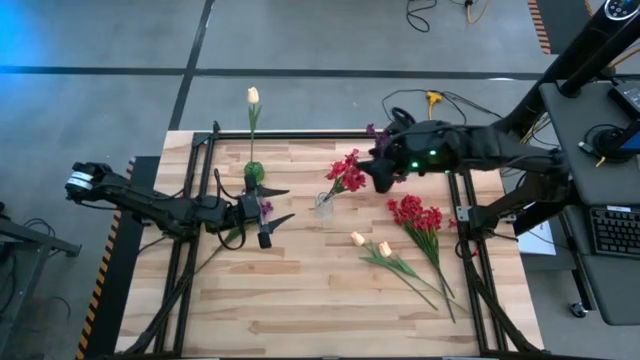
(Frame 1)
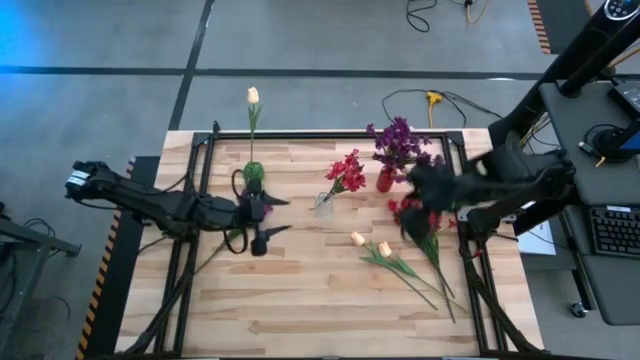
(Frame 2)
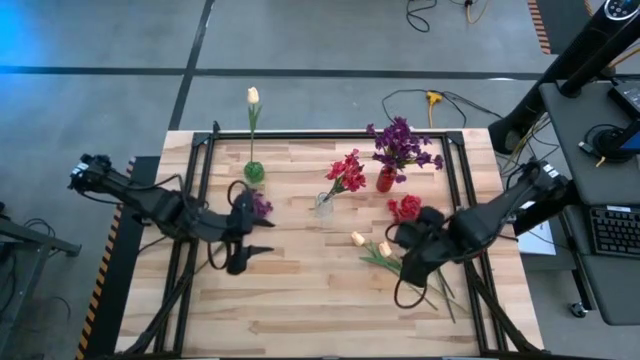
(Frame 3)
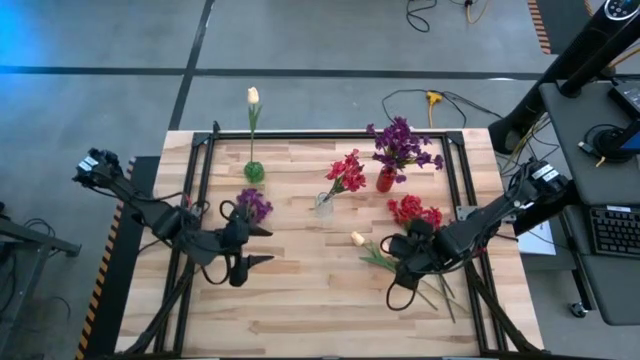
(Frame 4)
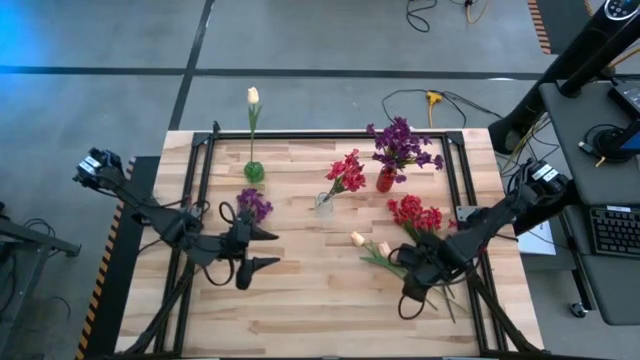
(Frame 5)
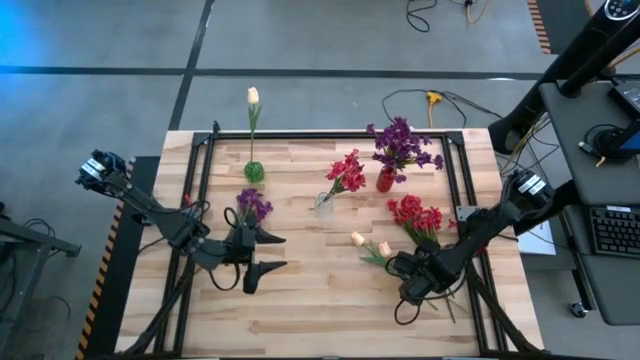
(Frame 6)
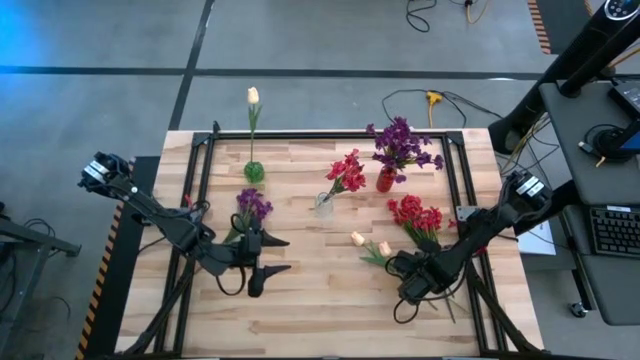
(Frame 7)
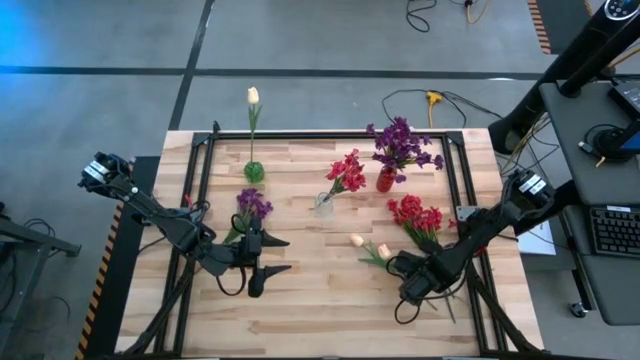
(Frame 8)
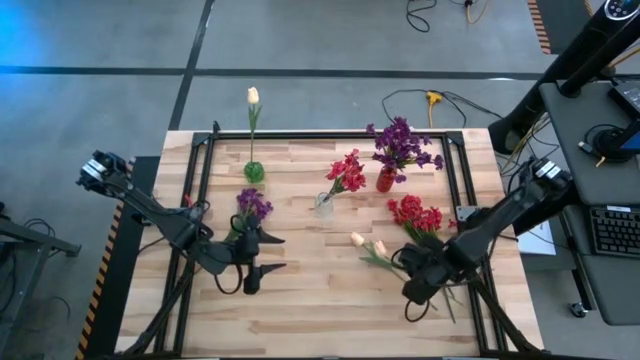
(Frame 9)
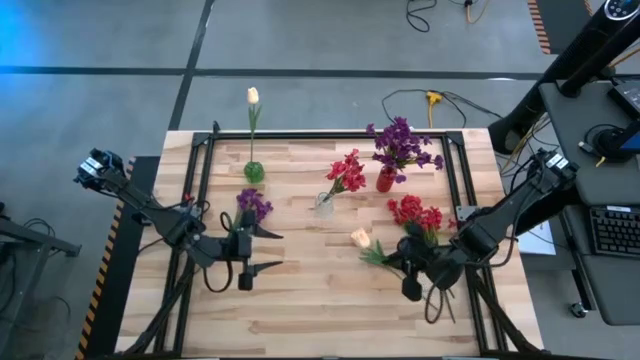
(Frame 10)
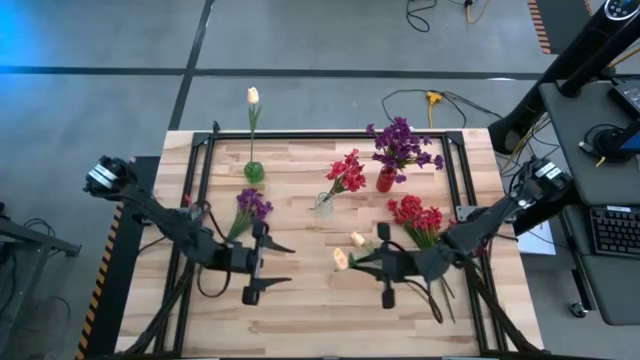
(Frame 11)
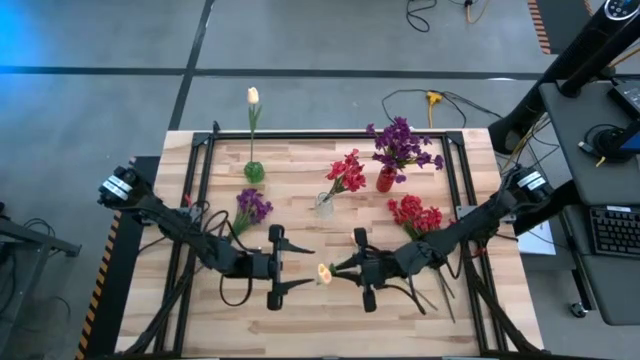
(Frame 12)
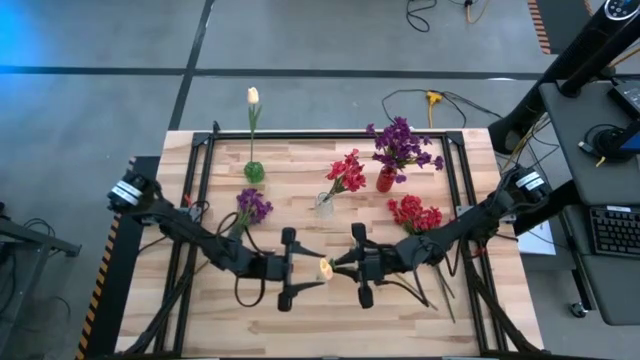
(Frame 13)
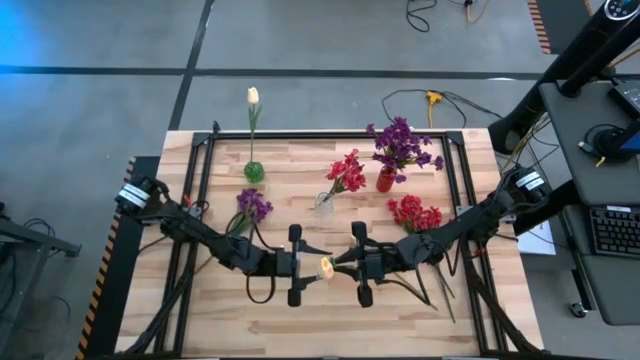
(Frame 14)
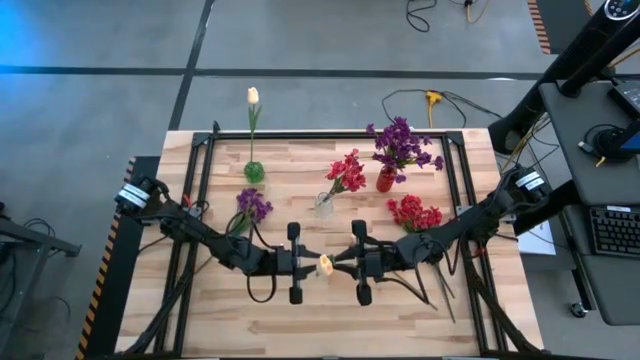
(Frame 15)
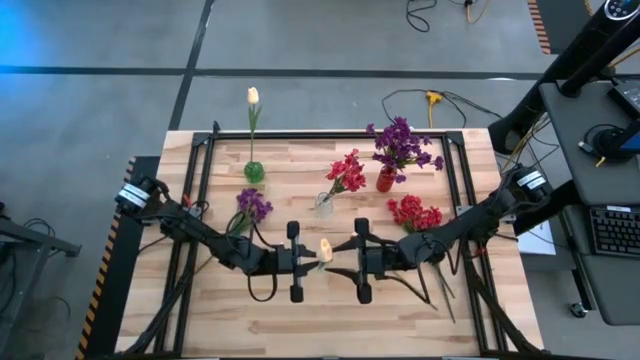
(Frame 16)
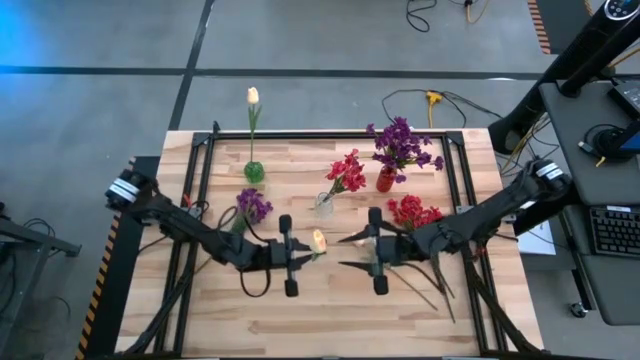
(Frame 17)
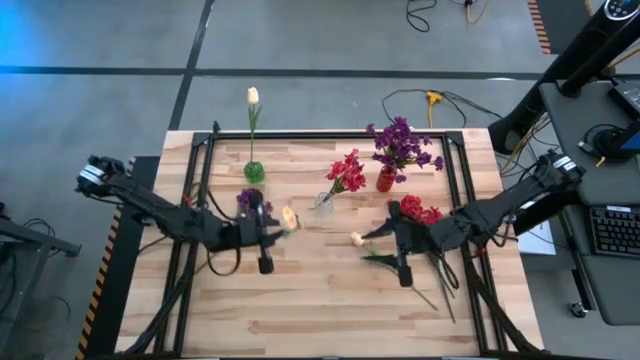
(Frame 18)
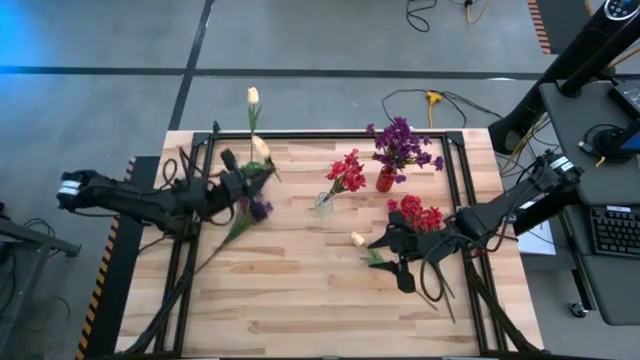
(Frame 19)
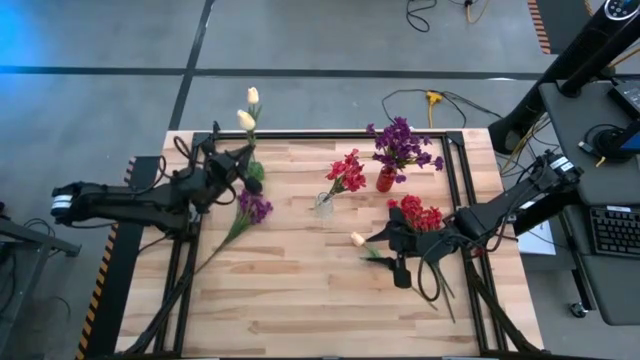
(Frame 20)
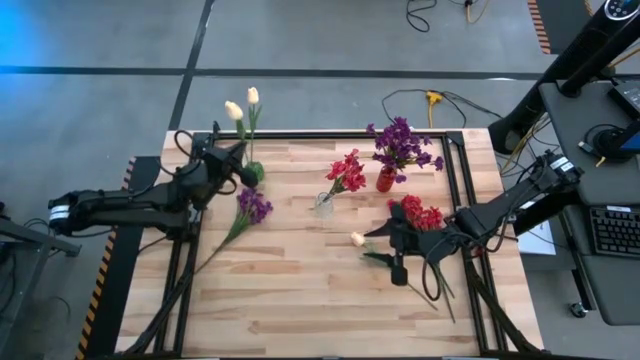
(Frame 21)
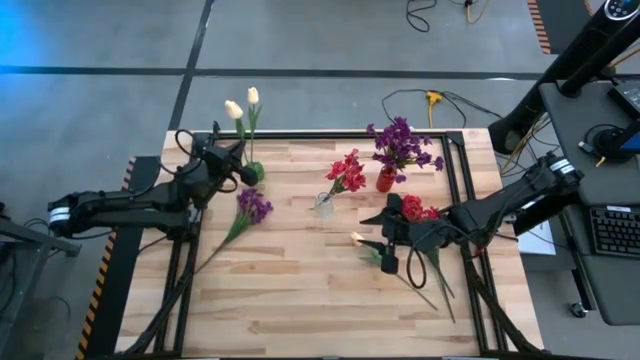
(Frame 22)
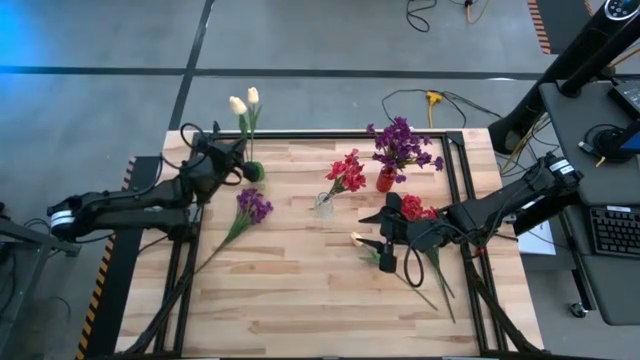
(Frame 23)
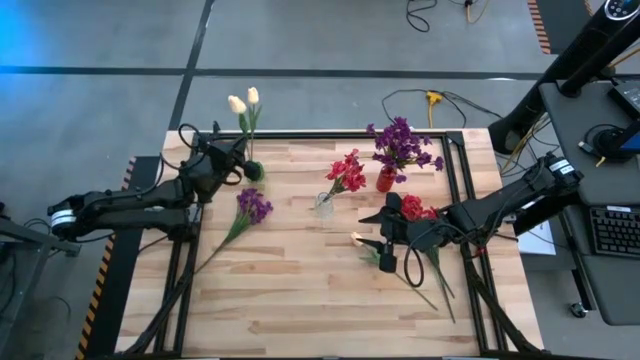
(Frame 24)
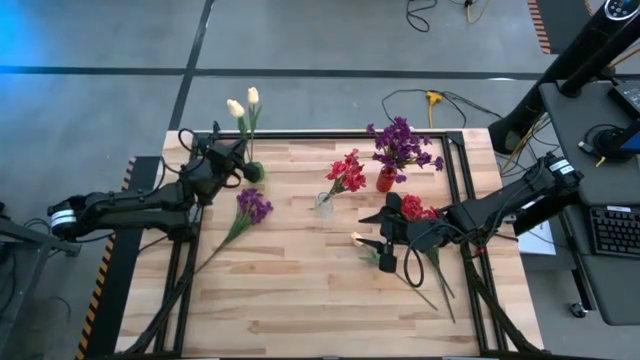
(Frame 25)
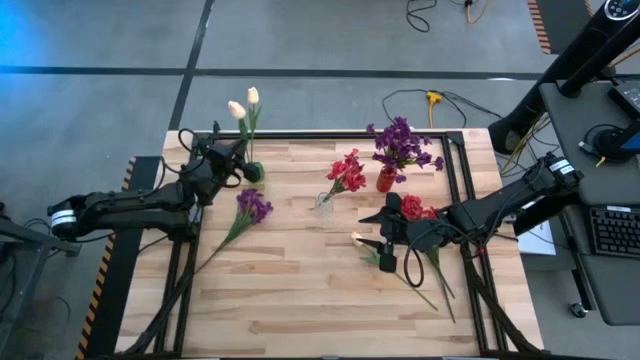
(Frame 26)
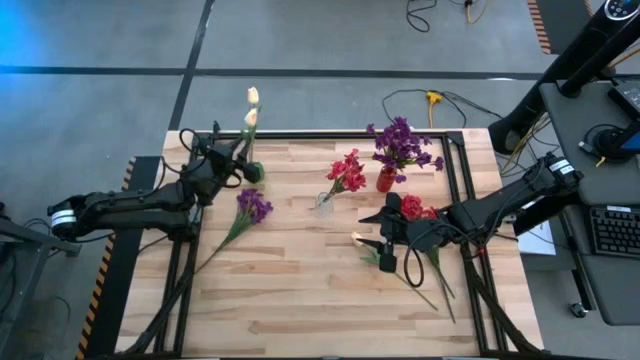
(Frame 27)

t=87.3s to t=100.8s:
Task: Sort flowers into vase by color
Put the right pink flowers into the green vase

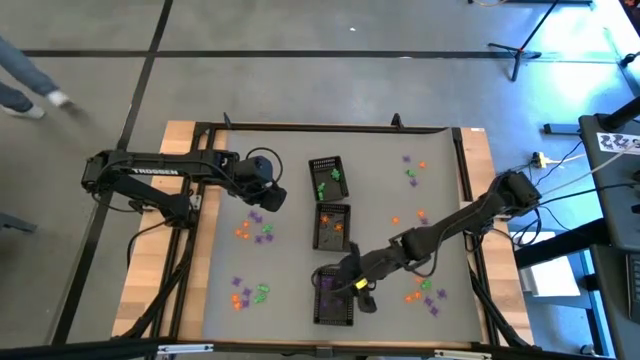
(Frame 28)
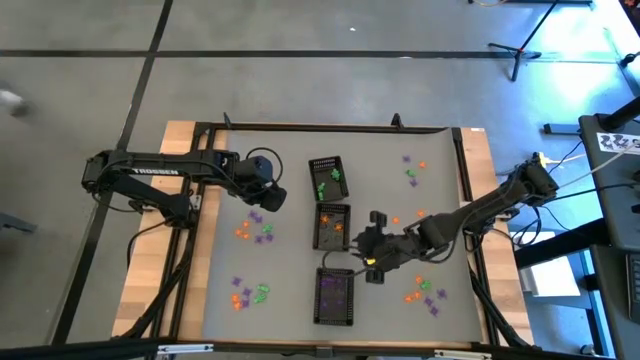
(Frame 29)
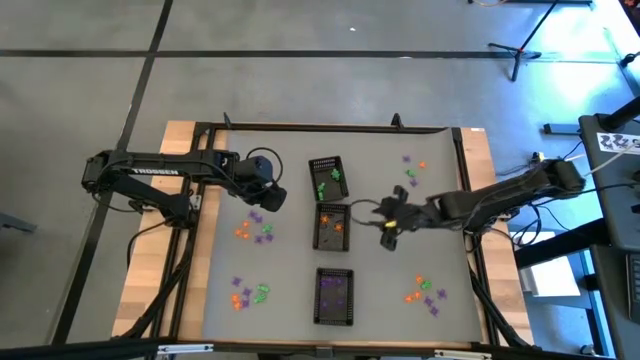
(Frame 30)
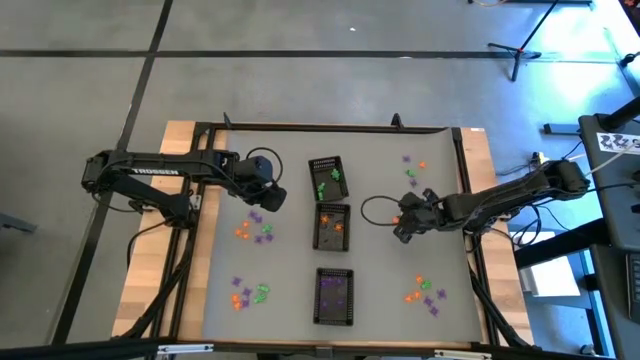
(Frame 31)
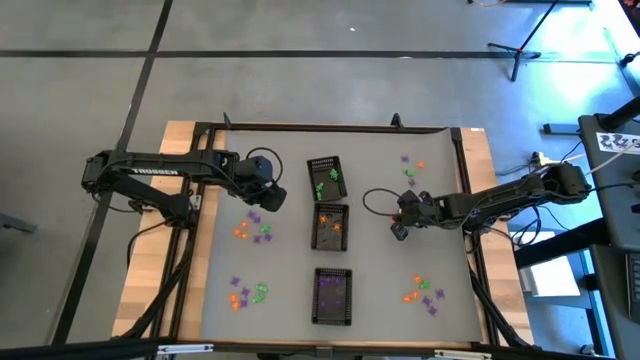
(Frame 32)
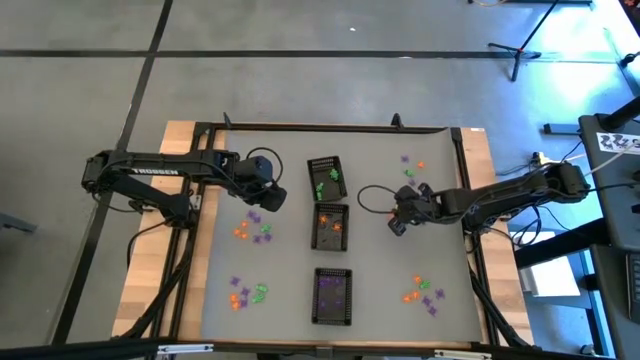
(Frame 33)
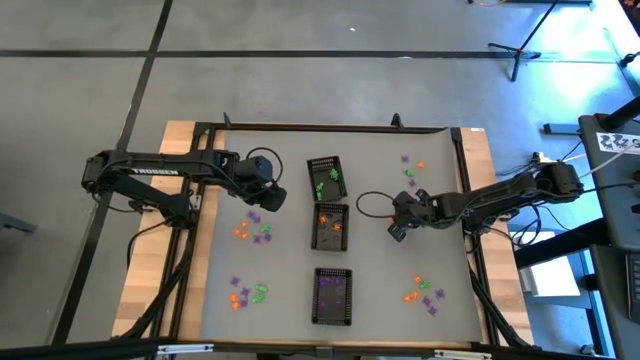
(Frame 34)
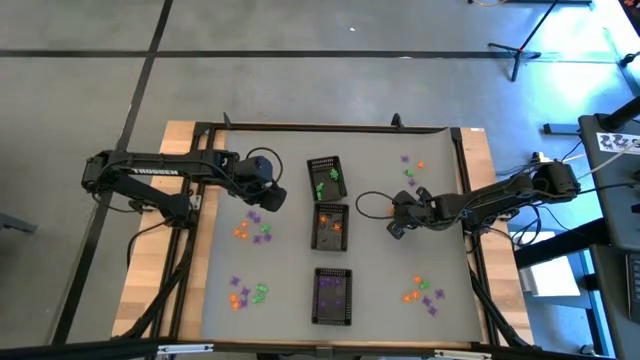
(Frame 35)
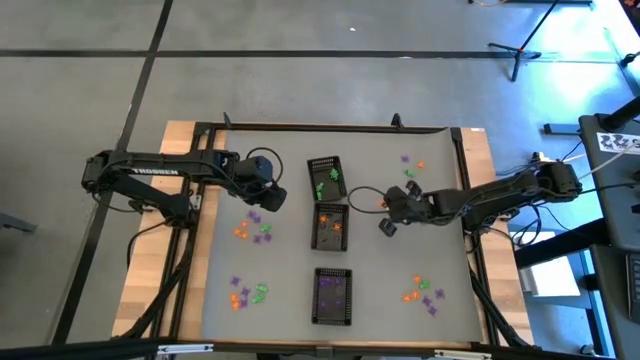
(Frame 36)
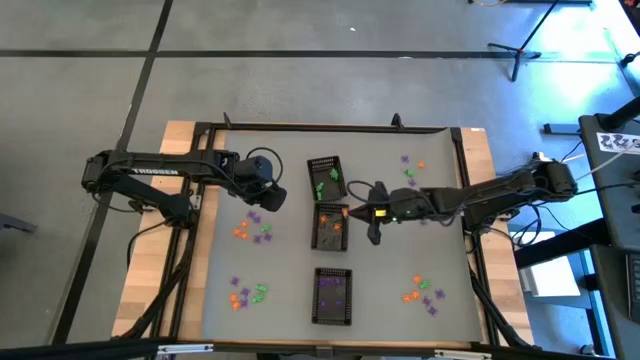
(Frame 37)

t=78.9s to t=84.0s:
Task: Sort Halloween decoration
Put the orange spider toy into the middle black bin

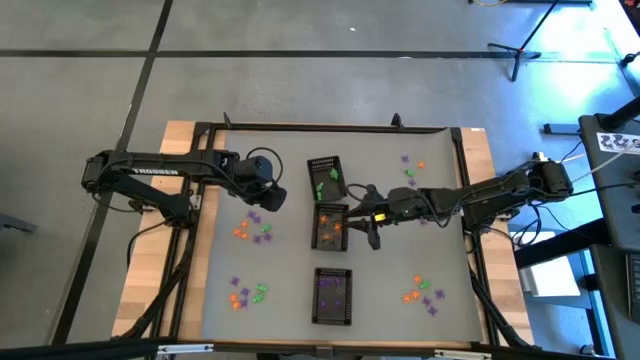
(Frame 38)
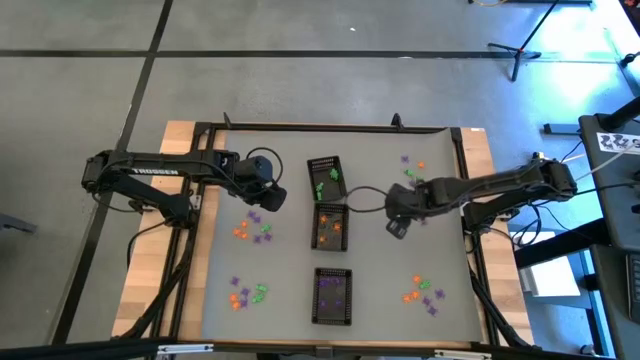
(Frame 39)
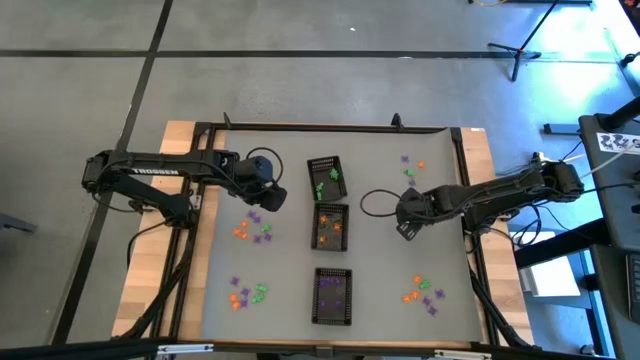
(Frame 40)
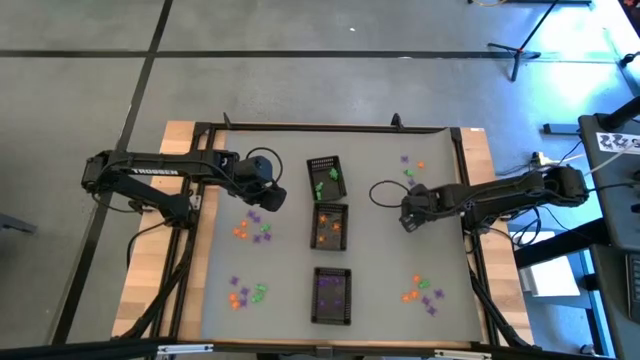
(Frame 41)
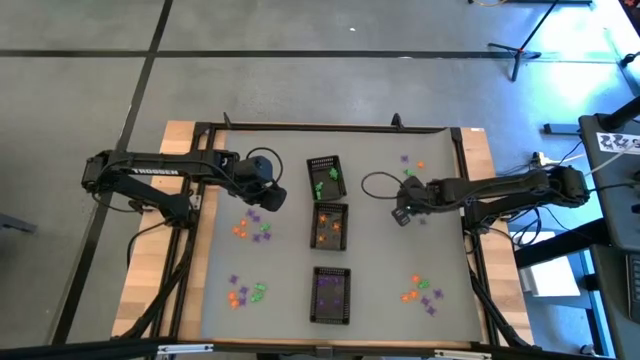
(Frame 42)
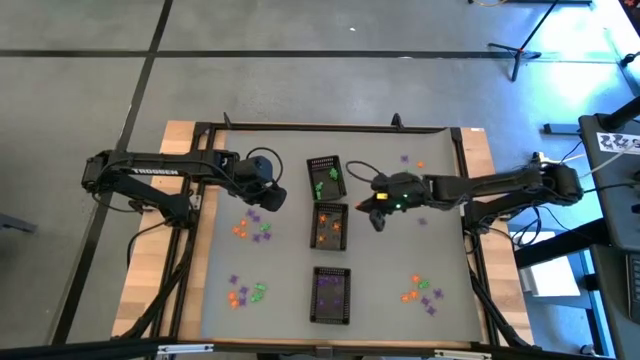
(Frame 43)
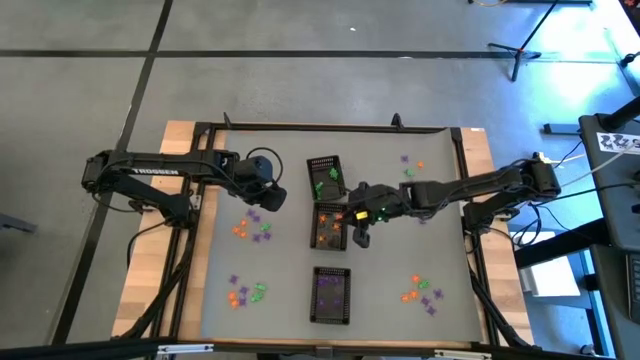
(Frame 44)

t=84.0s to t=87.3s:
Put the orange spider toy into the middle black bin
